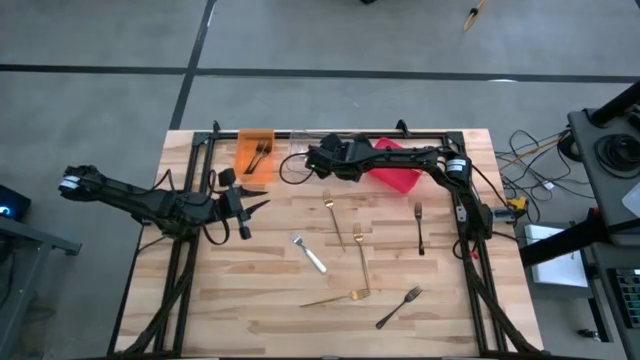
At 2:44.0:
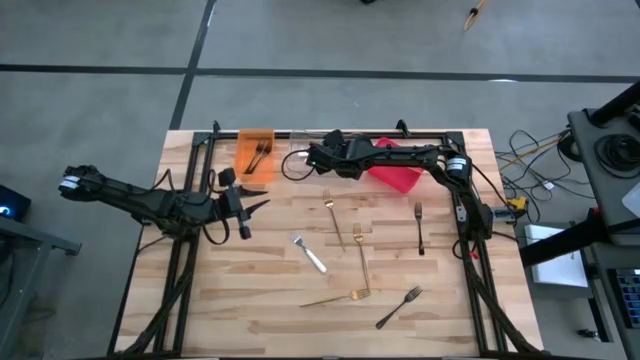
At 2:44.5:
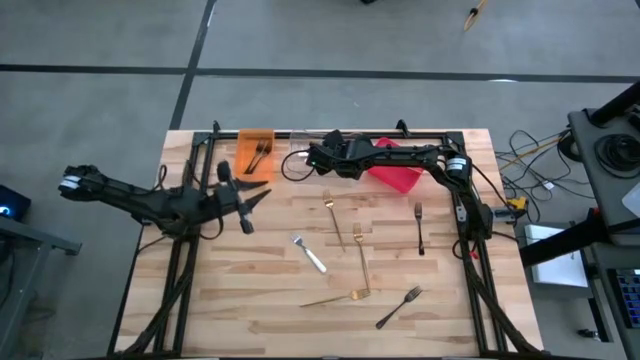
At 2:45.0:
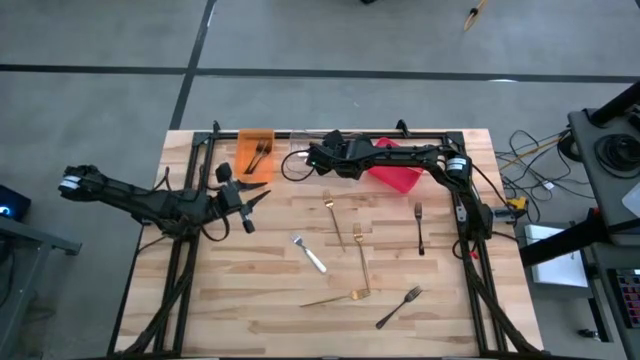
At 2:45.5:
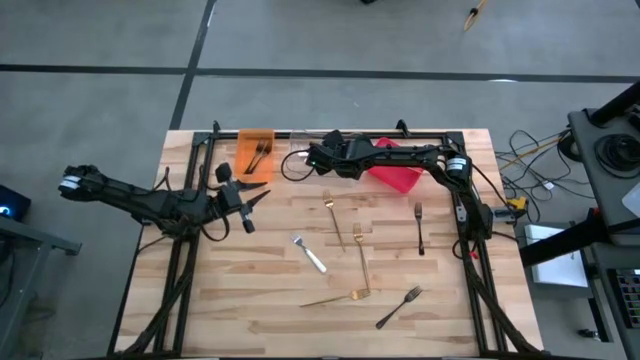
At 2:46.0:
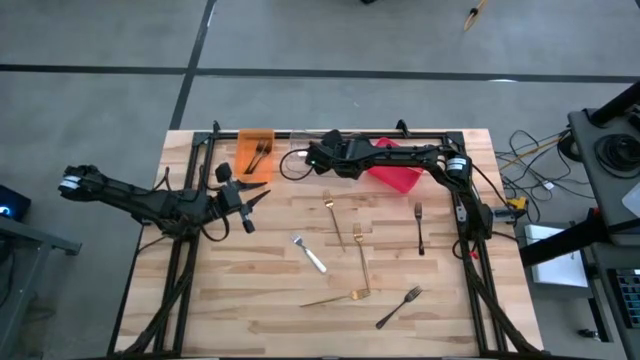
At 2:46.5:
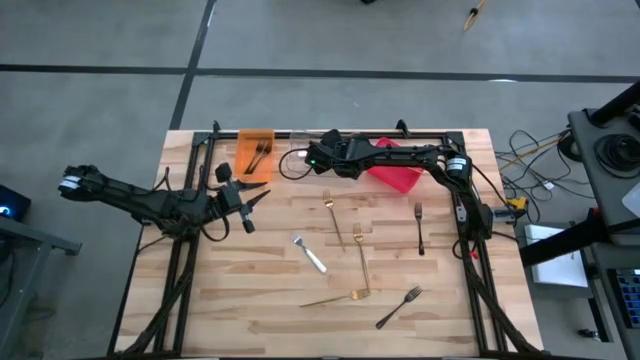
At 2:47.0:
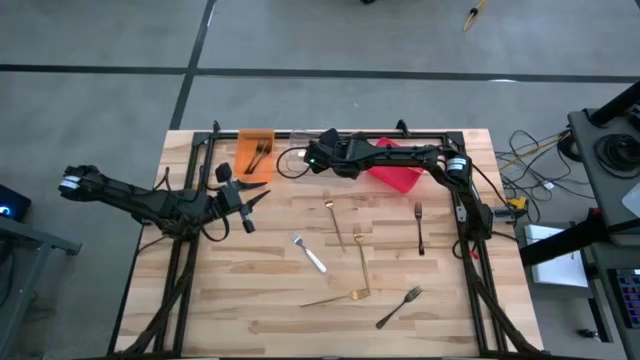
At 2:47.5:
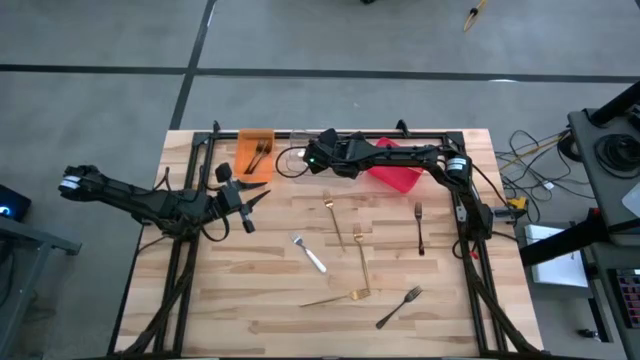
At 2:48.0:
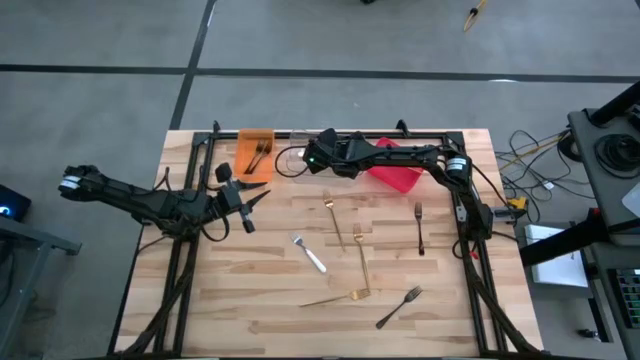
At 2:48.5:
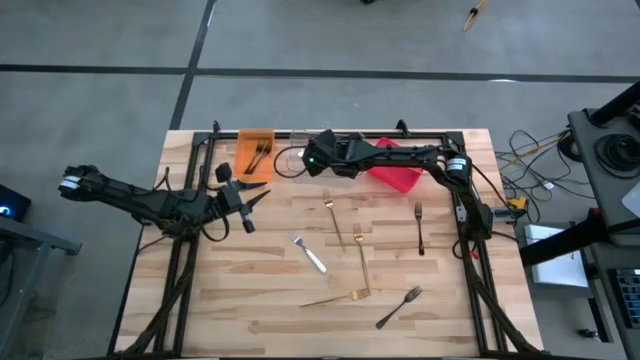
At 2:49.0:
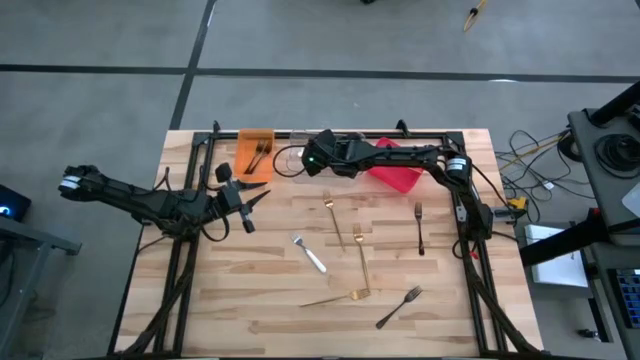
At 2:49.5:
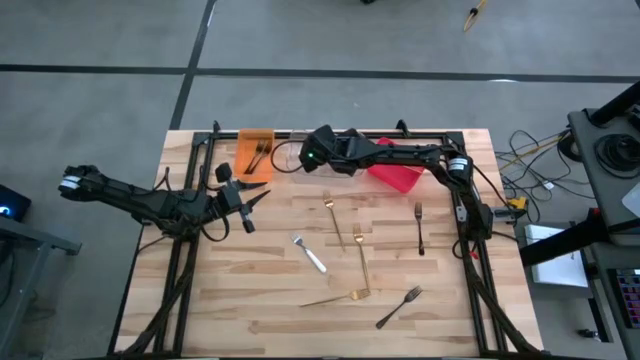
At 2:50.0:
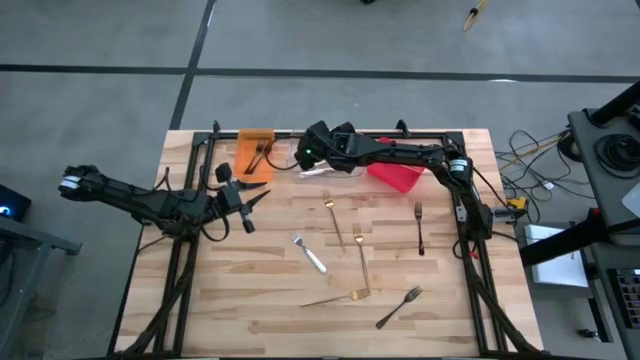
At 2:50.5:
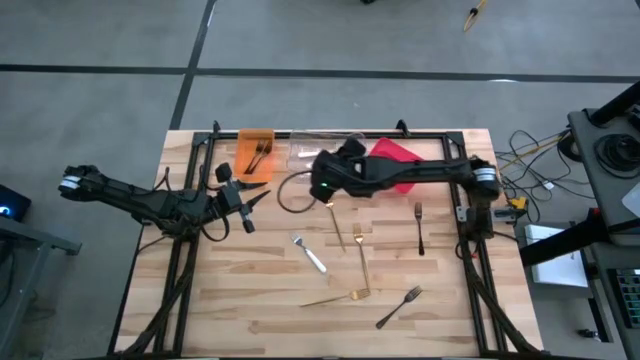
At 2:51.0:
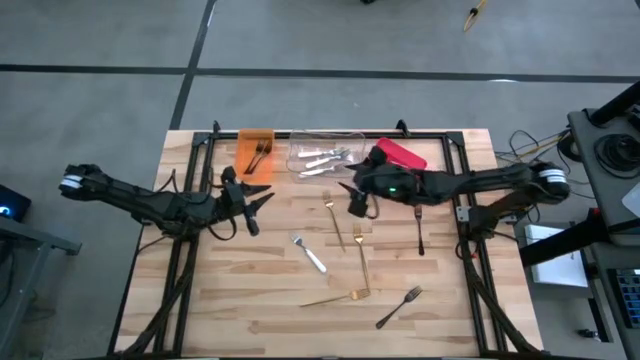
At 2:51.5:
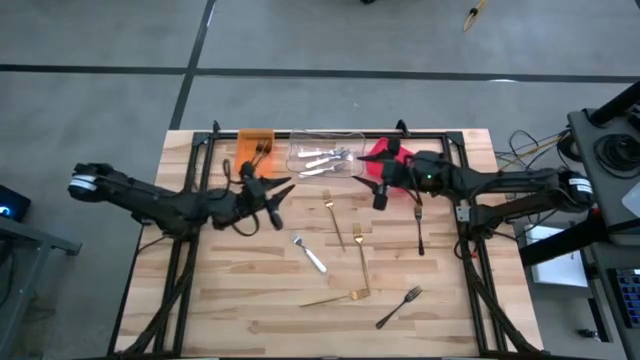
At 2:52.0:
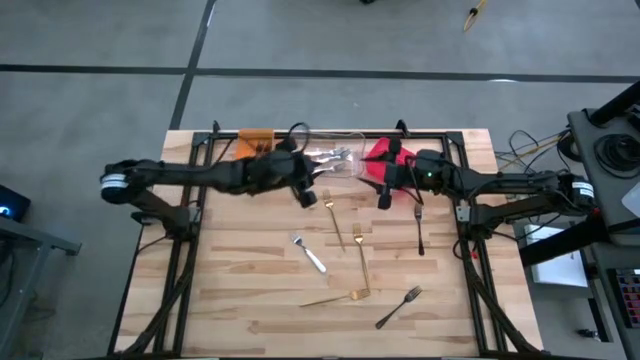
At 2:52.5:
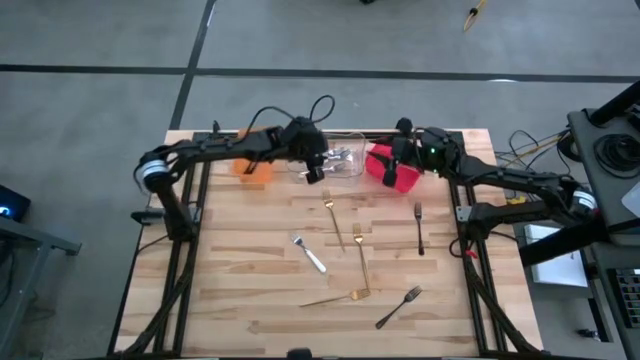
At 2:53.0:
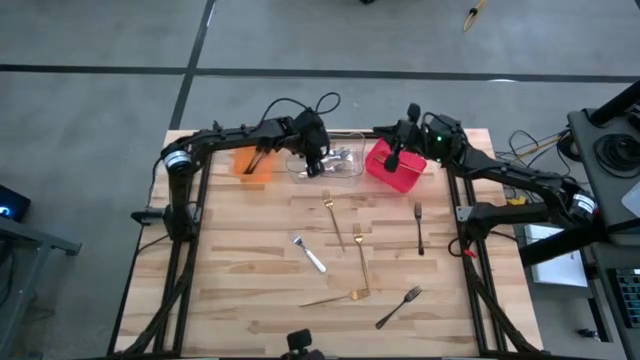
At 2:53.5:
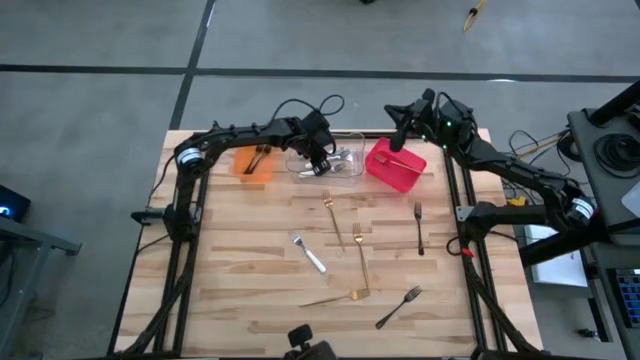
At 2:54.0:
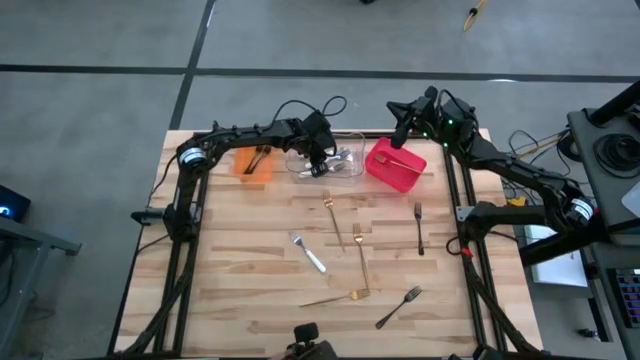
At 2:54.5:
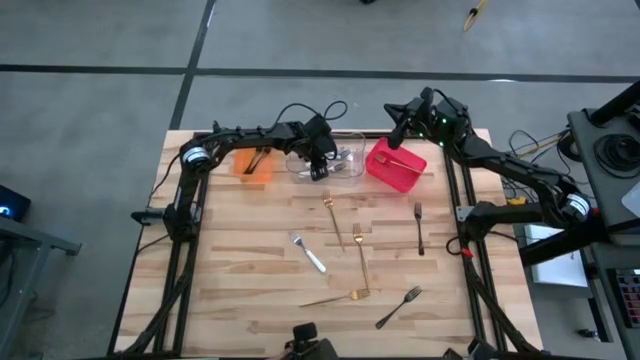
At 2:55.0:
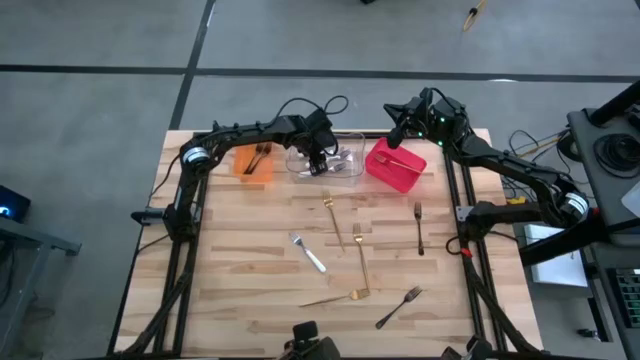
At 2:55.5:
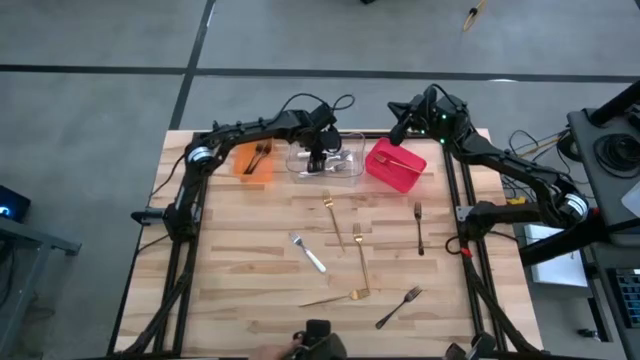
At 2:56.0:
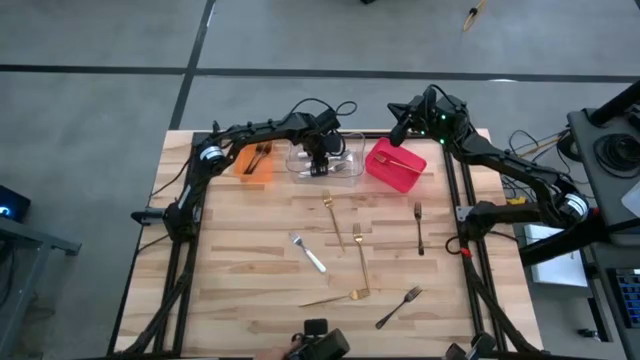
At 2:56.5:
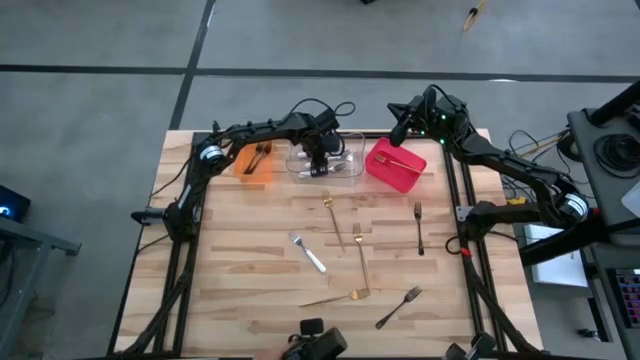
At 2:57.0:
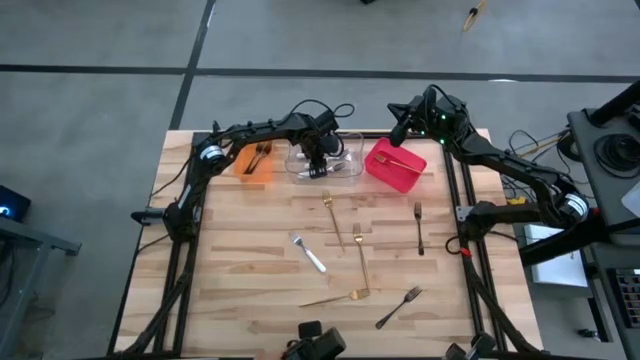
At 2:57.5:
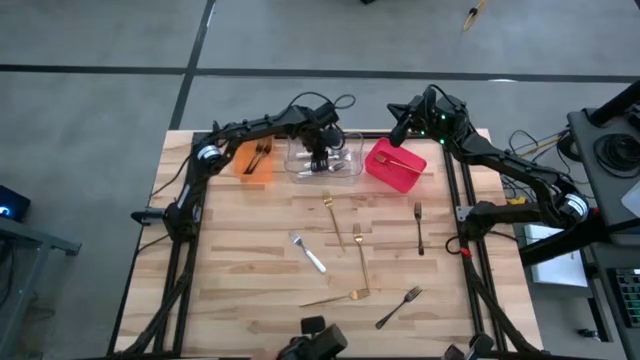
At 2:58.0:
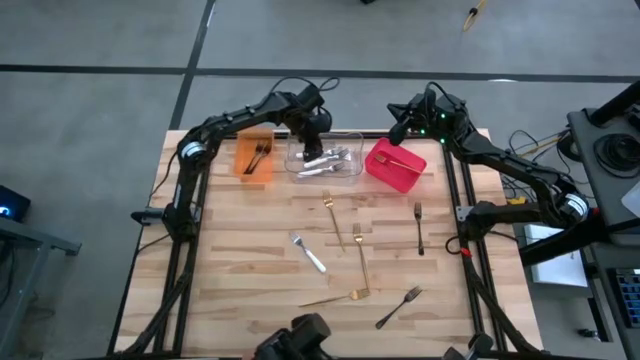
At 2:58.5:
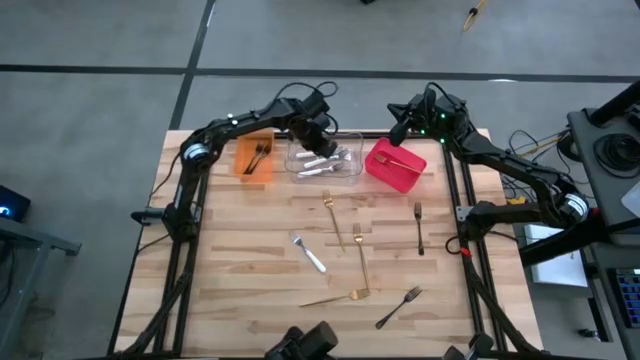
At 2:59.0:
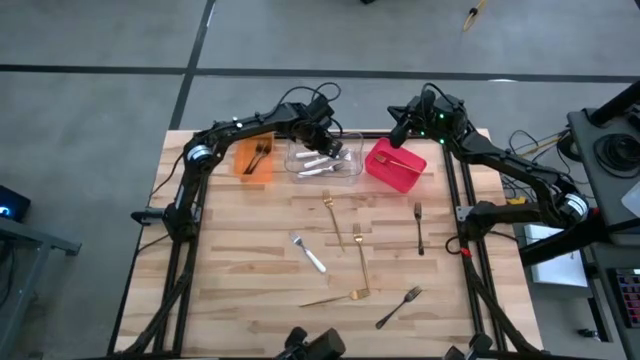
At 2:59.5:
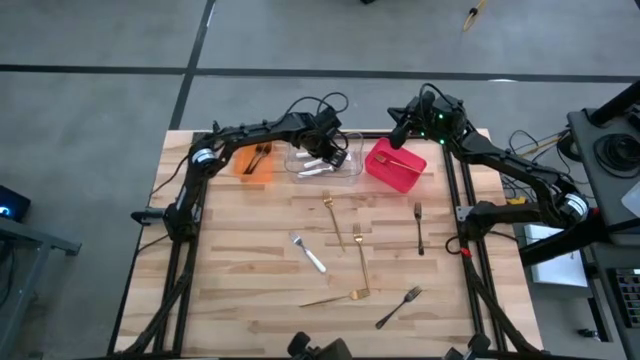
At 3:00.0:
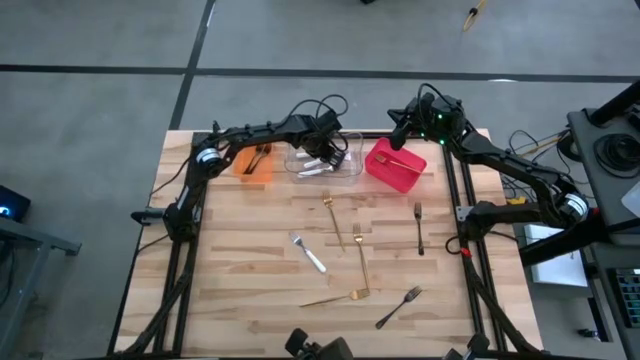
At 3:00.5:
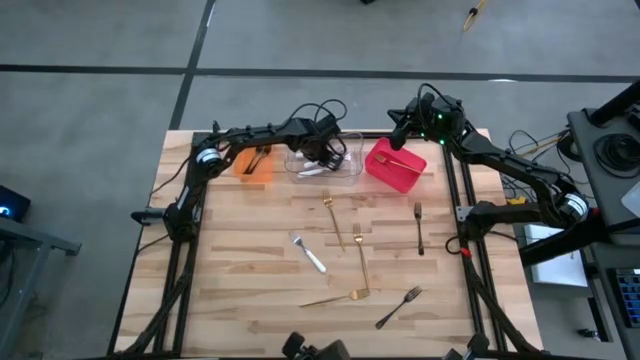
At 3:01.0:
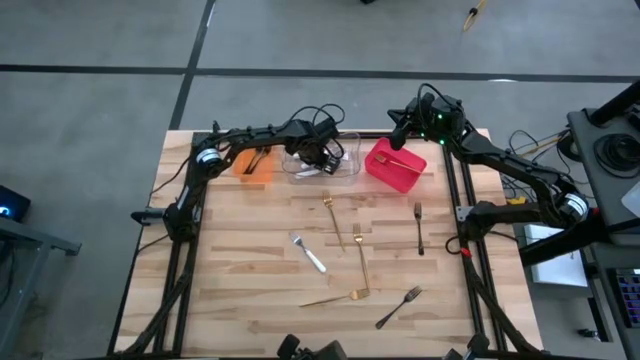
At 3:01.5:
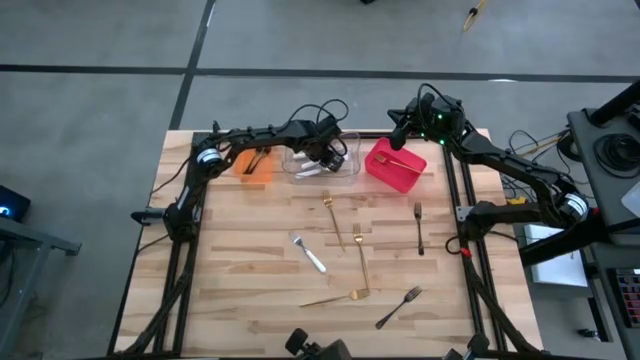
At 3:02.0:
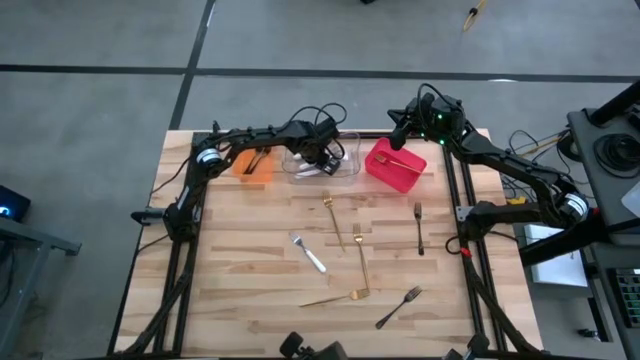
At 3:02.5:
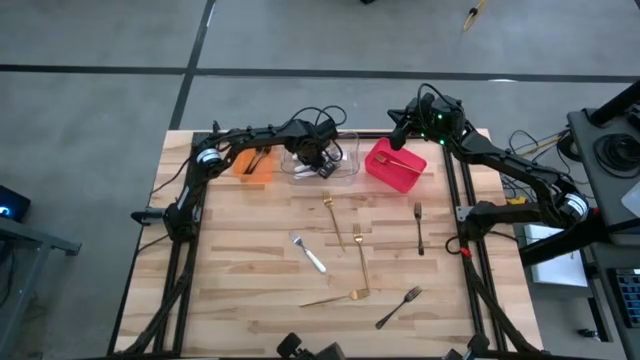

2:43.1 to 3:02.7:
Task: Sort silverware by color (type)
Put the white fork into the transparent bin

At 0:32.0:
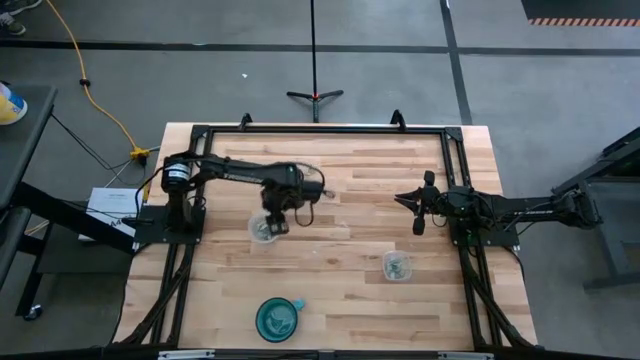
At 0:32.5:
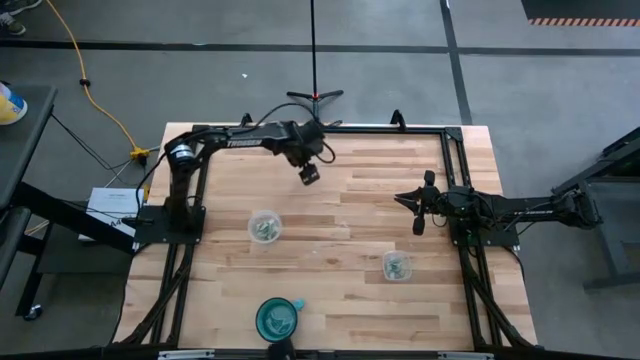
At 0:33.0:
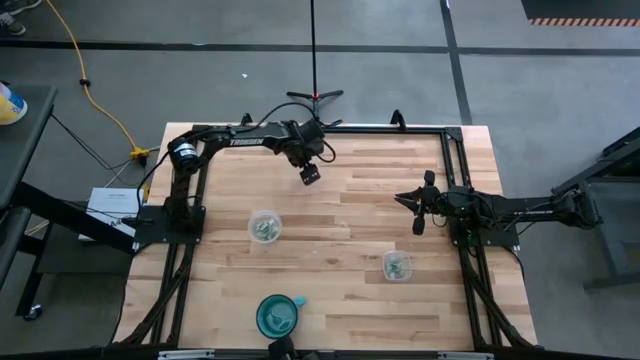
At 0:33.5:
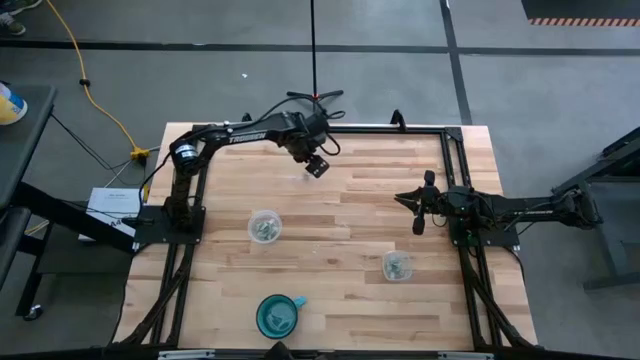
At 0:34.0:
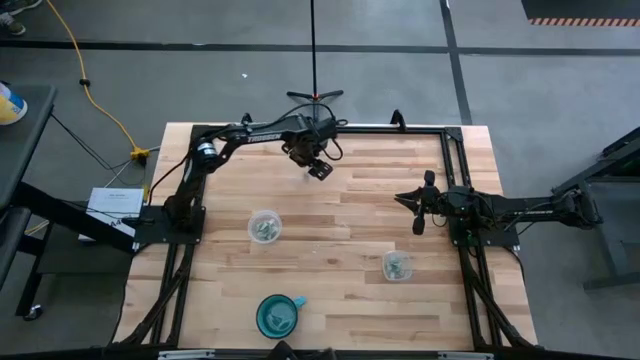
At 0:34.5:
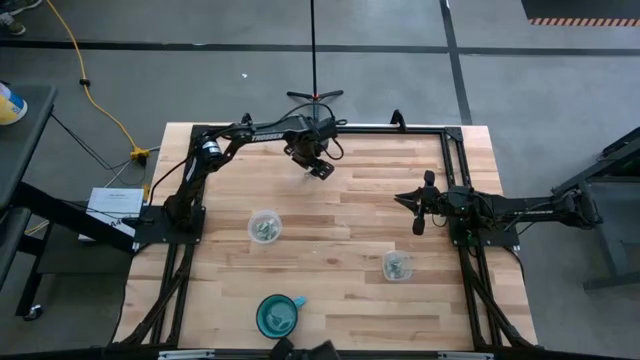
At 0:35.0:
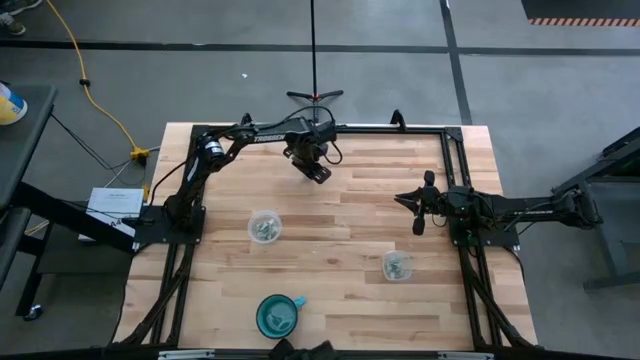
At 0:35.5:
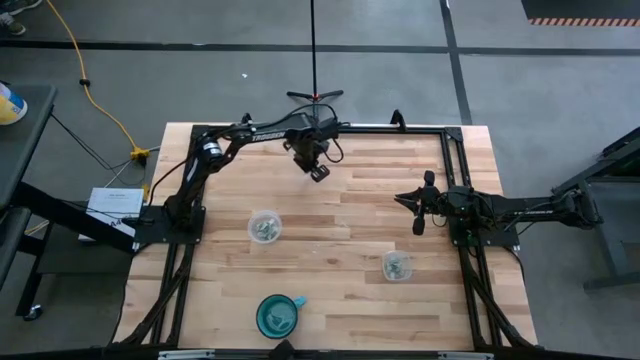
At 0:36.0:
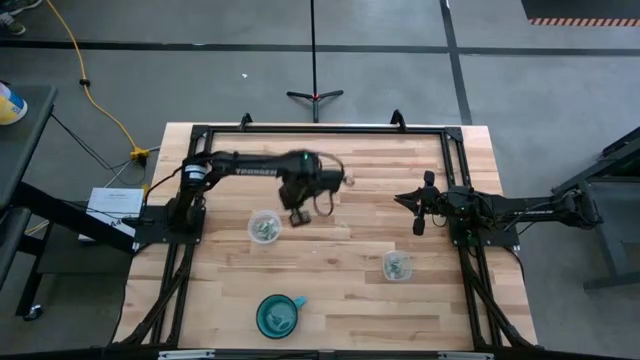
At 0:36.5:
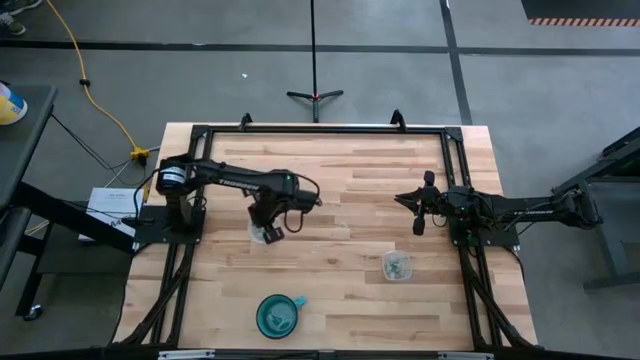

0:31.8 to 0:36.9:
Task: Sort candy
Put the green candy into the circle transparent bin
